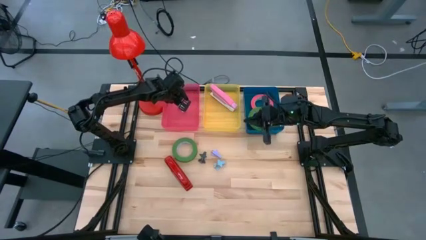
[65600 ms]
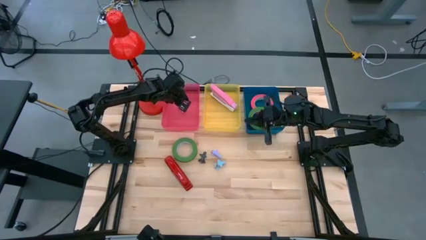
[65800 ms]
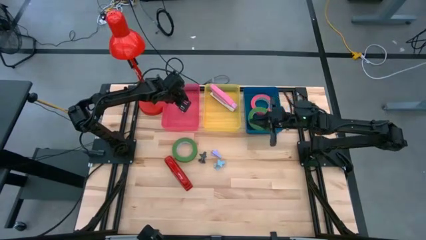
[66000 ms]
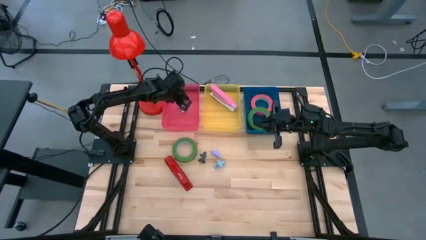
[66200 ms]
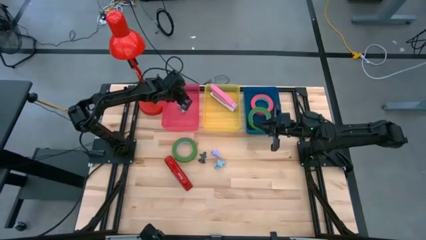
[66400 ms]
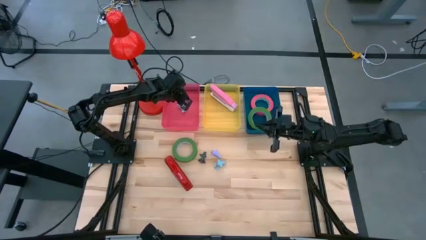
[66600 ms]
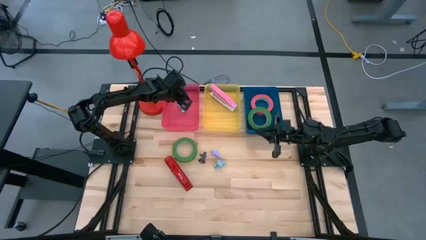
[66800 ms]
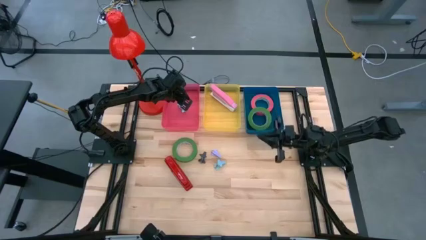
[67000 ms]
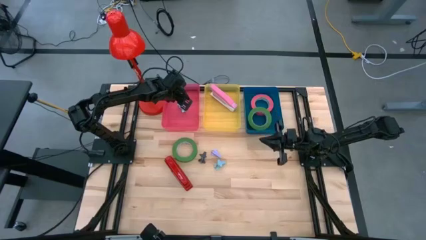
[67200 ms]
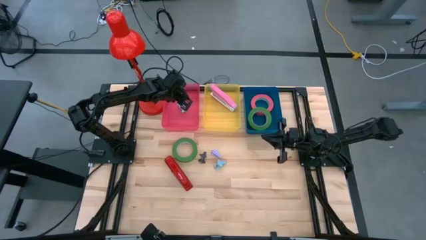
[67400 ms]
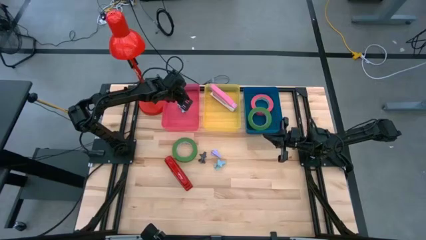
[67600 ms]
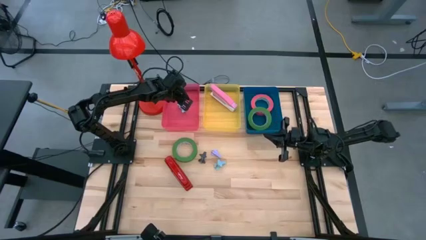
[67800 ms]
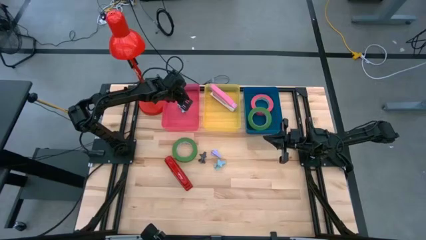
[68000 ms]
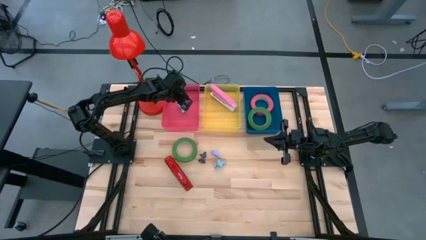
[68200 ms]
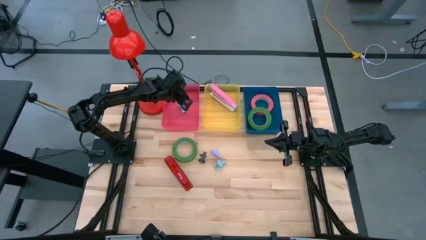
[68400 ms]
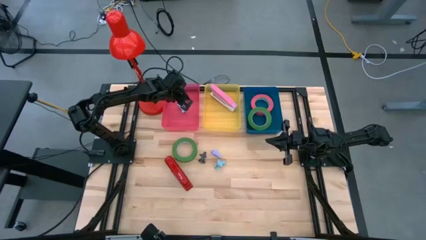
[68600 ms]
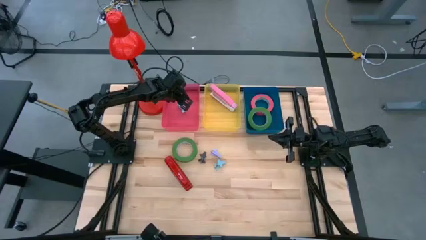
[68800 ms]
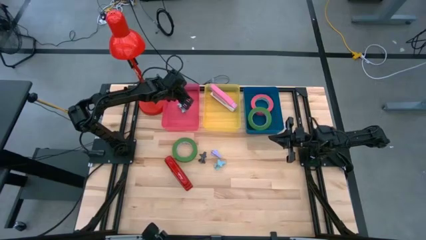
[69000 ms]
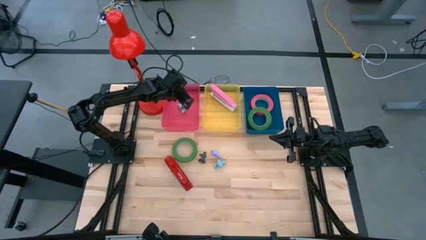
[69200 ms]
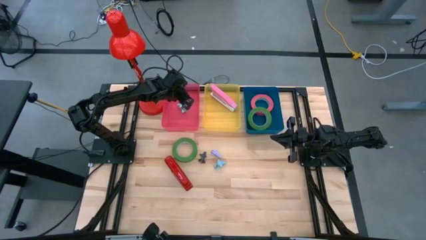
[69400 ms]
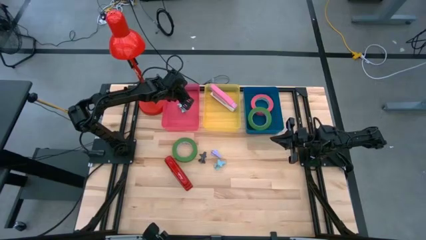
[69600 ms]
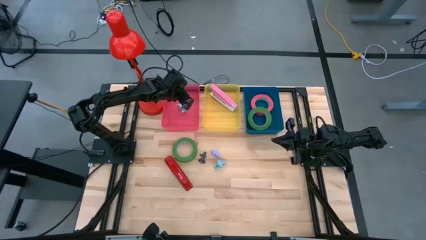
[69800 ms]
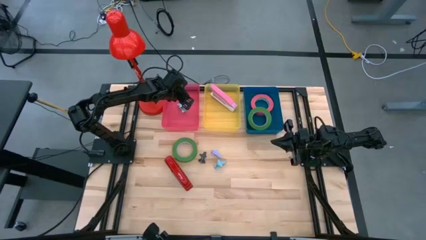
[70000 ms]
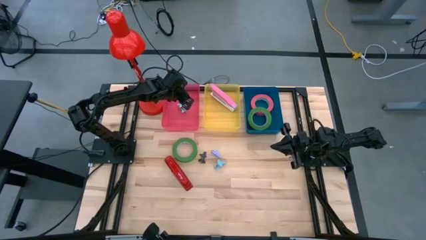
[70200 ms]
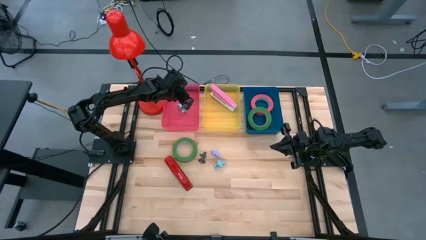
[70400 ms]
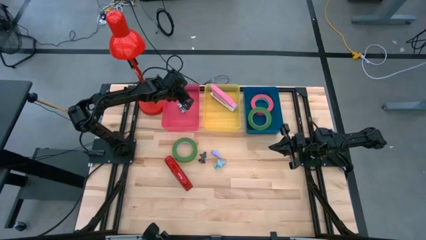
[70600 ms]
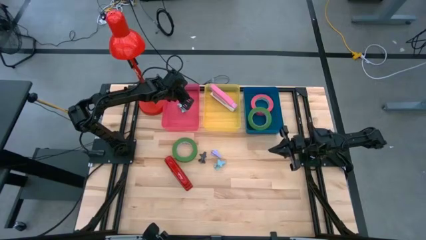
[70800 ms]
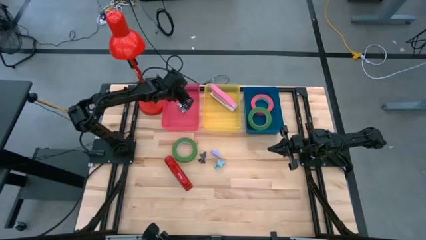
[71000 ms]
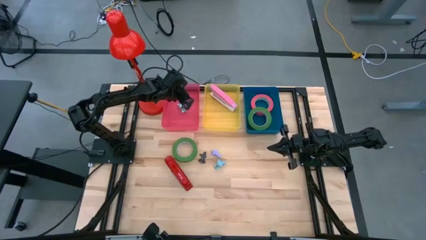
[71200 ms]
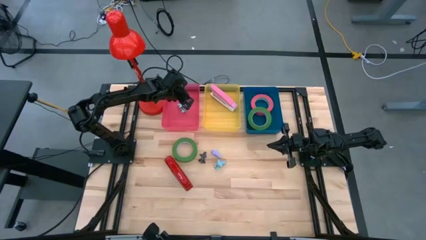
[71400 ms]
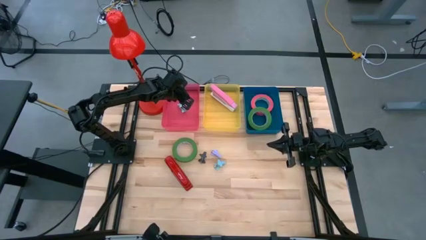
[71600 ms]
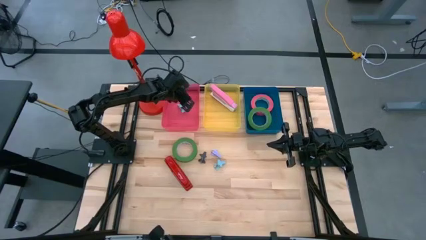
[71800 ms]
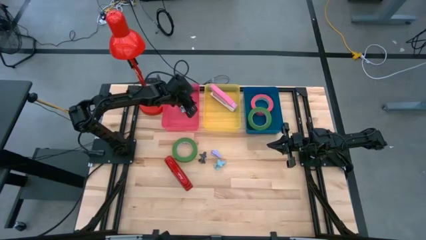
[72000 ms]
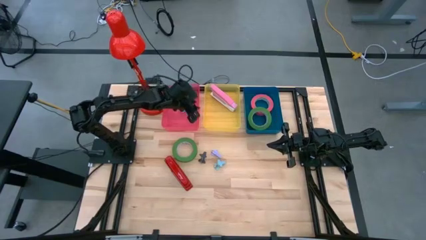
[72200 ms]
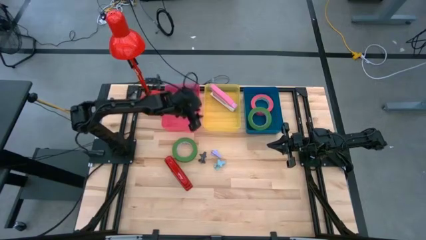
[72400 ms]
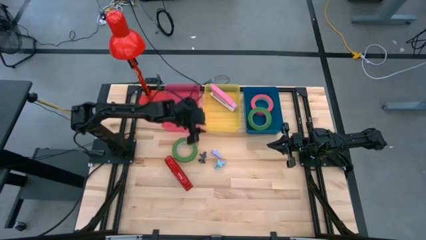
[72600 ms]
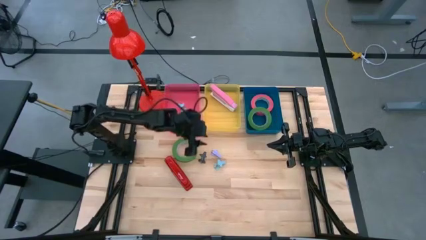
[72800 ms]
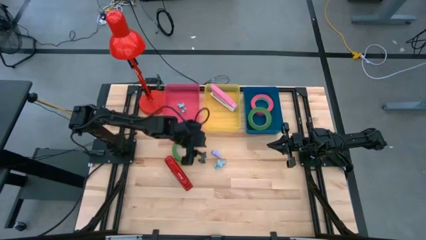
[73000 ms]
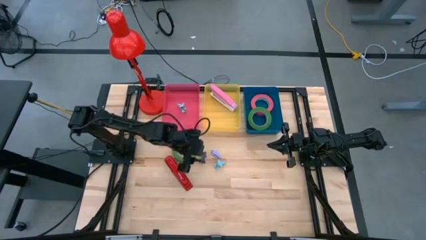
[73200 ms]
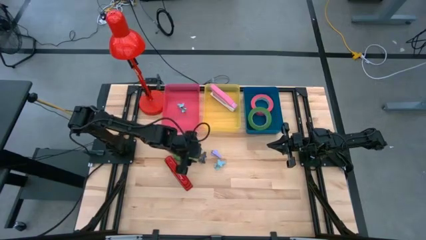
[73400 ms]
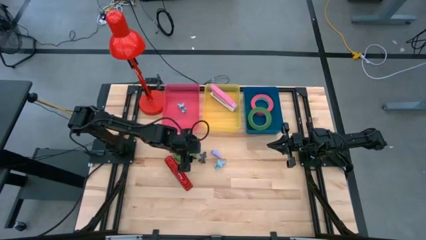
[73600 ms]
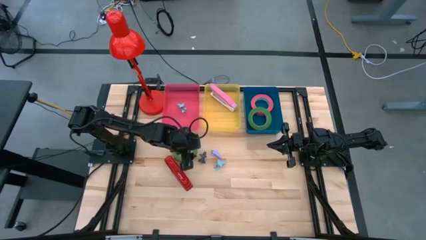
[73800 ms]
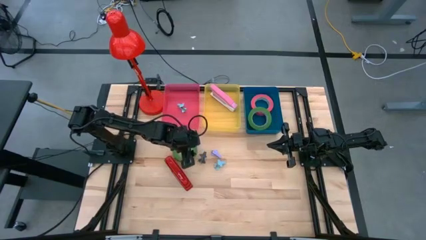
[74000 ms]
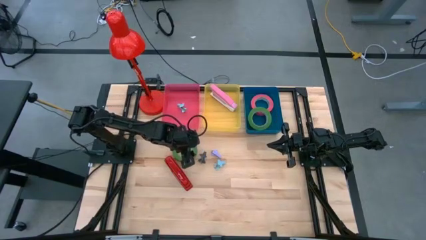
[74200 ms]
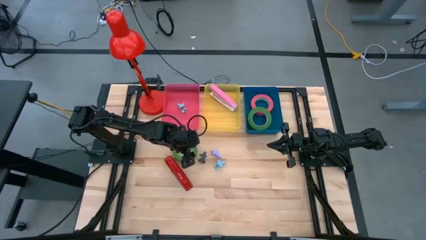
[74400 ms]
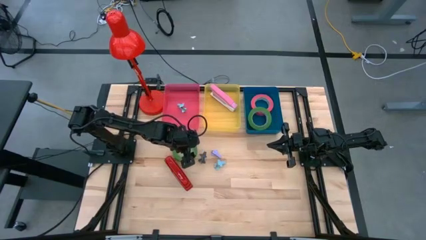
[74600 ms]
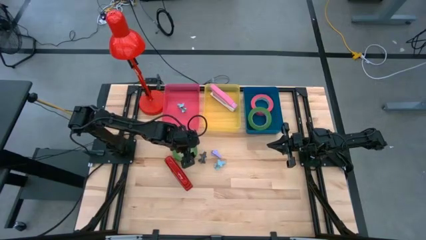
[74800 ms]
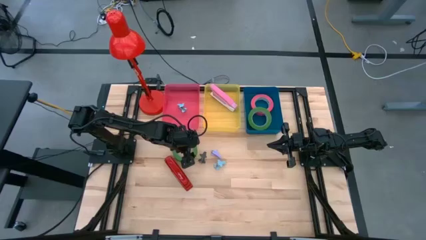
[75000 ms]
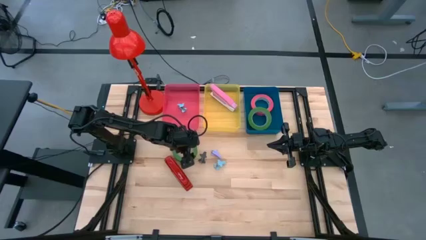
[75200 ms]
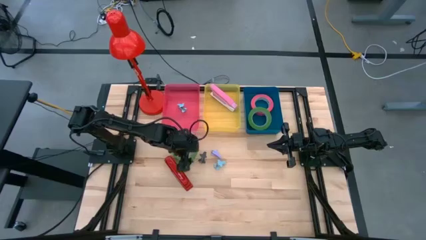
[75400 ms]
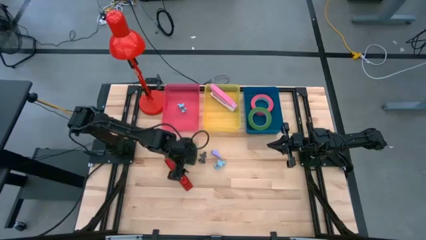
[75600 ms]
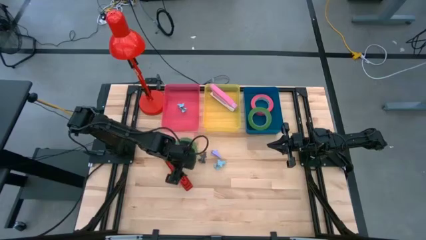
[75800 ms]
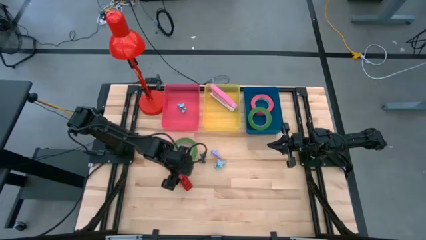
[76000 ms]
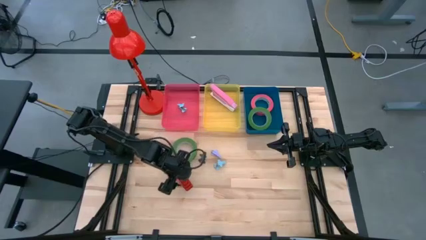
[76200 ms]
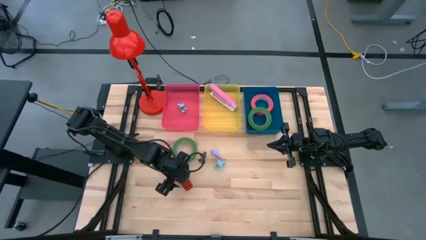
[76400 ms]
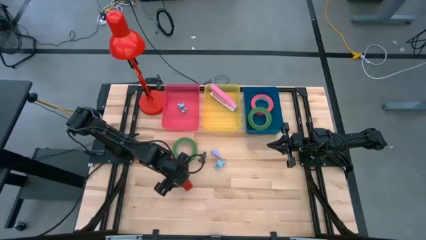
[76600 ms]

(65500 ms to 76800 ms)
Task: Pick and place Stapler, Stapler remover, tape
Put the red stapler into the yellow bin
